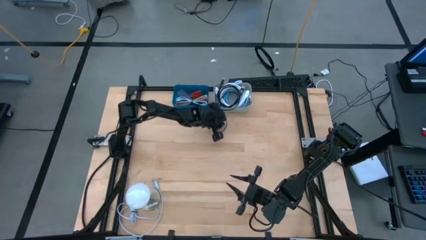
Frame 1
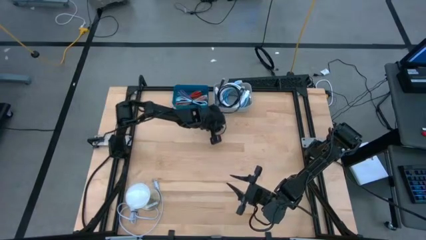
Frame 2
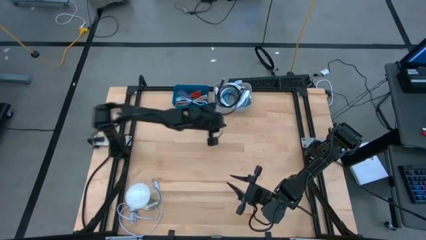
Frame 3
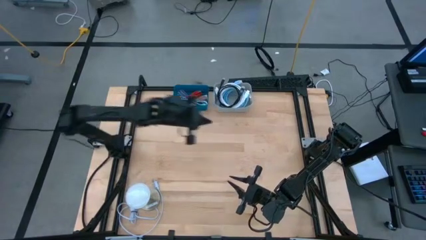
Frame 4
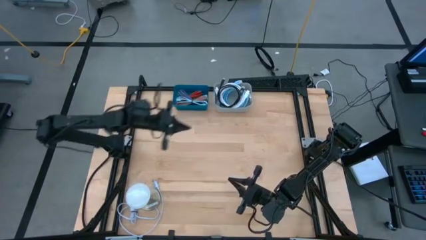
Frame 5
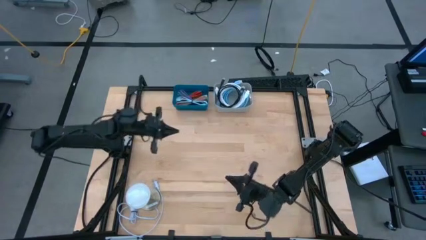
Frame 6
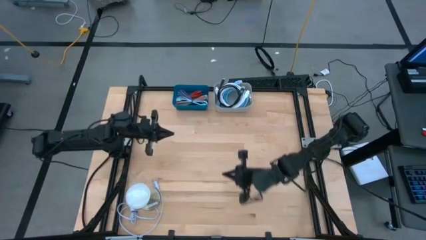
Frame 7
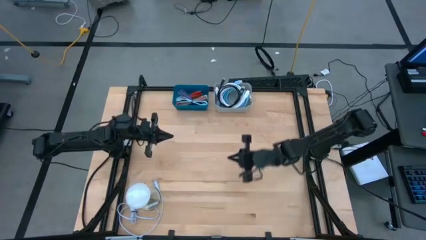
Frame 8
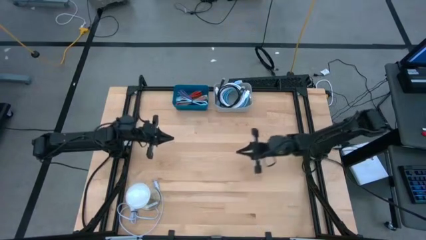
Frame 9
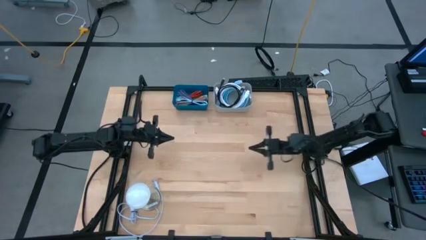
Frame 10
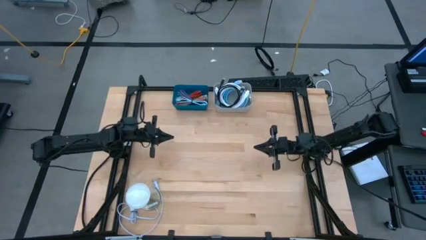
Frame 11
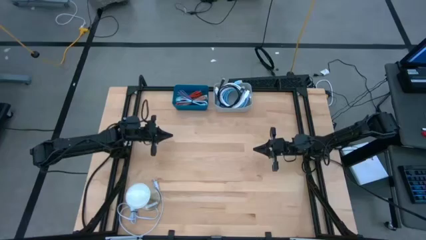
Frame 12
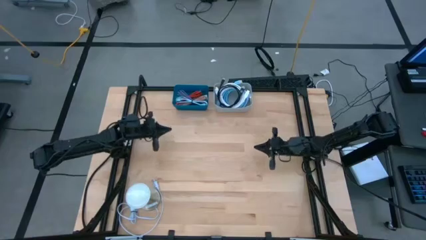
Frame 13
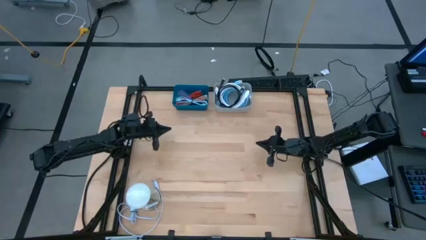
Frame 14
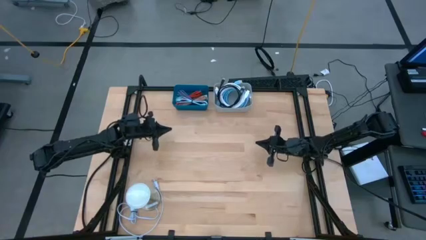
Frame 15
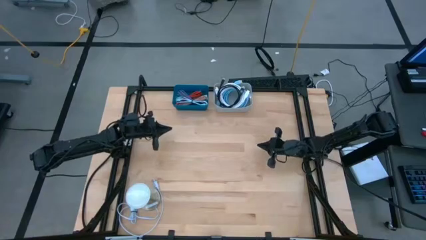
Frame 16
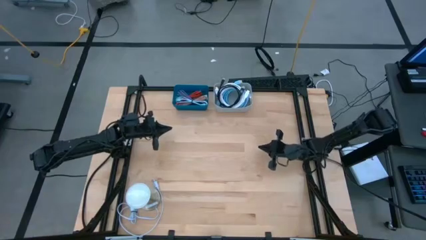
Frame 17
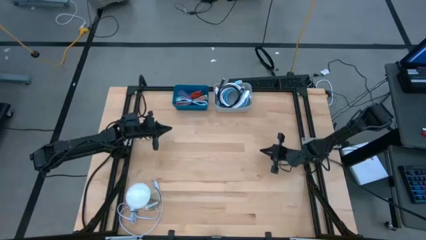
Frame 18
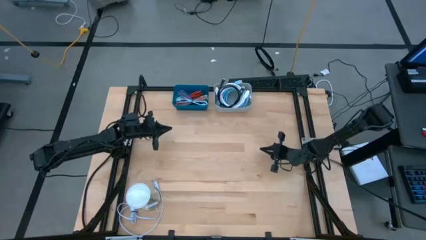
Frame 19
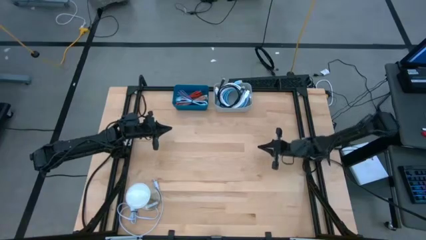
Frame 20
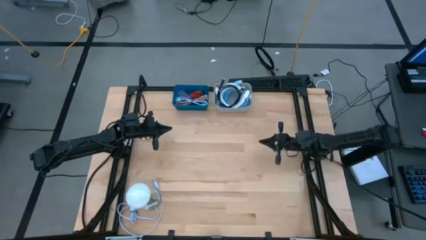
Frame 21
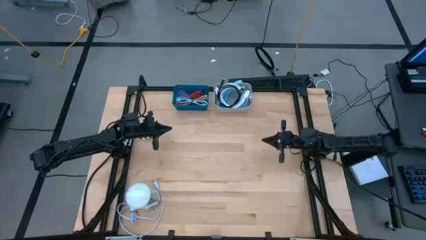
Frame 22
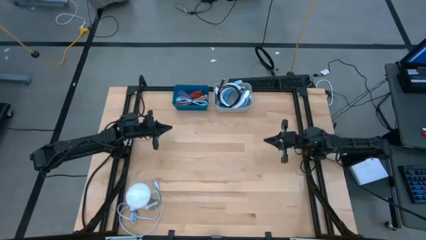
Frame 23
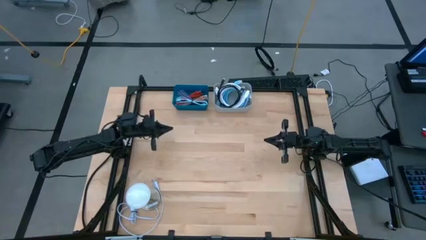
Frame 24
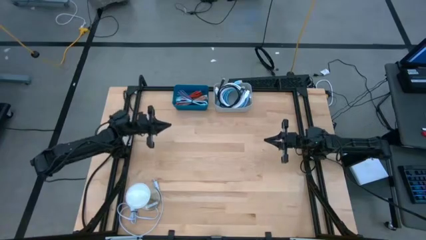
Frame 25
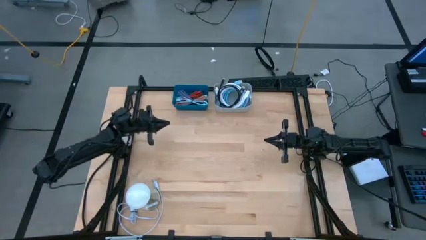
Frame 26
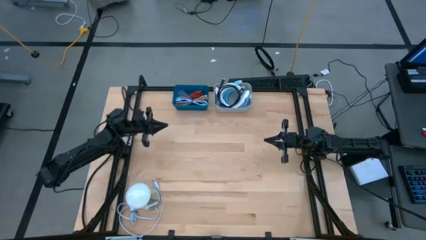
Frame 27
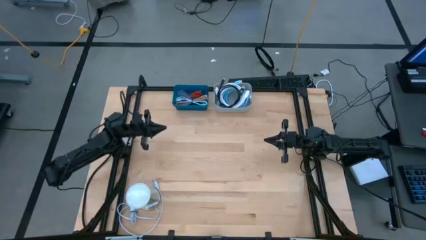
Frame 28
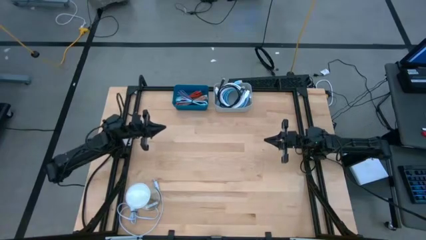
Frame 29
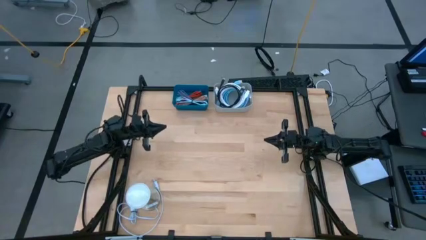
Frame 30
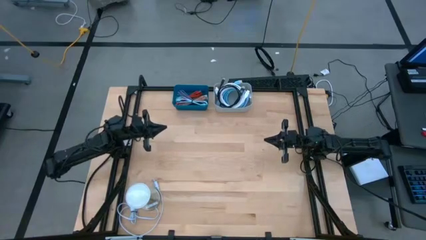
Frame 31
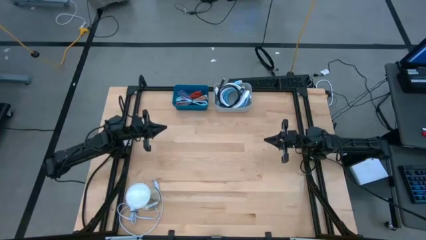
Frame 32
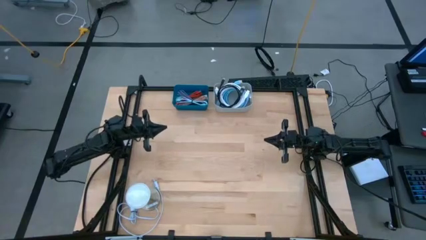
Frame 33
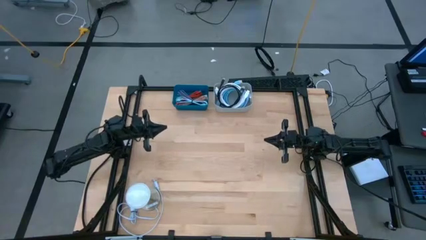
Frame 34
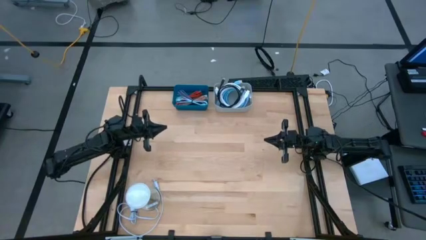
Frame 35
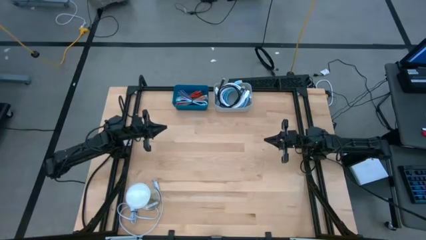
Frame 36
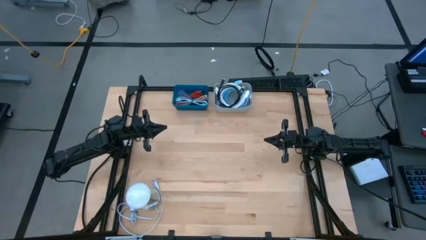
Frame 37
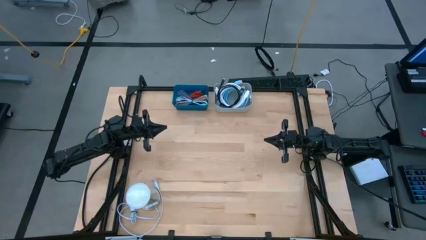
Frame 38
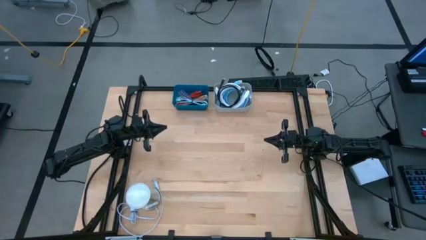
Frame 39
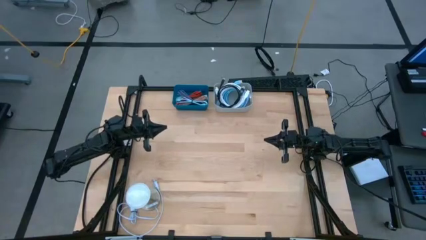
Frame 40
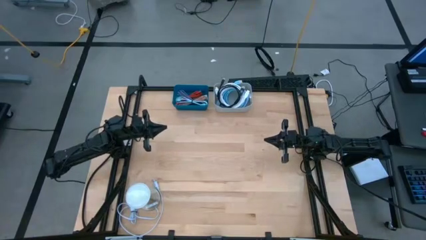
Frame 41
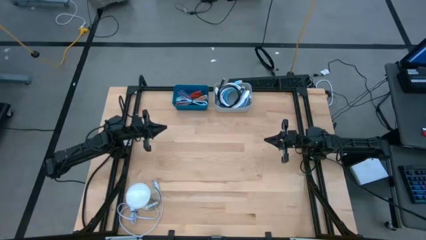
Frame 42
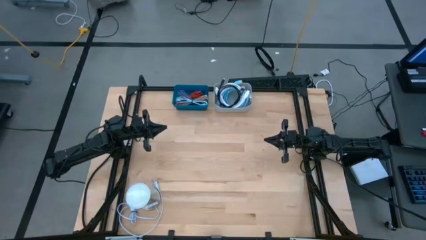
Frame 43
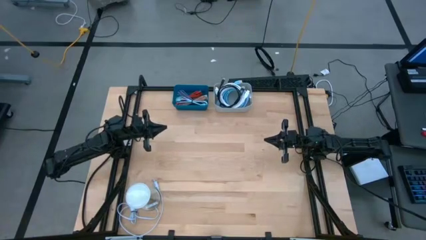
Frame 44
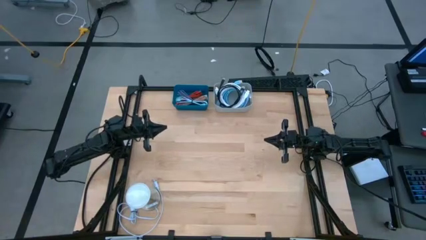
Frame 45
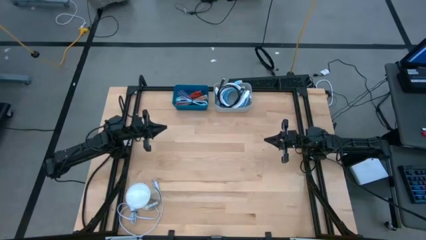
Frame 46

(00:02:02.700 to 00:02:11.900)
Task: Pick & Place USB Port
Return to Home Position

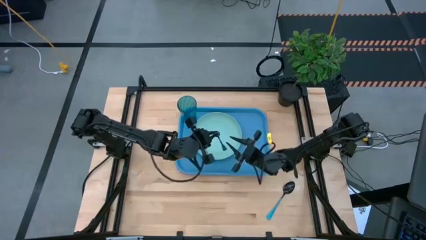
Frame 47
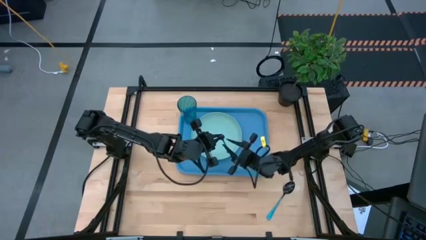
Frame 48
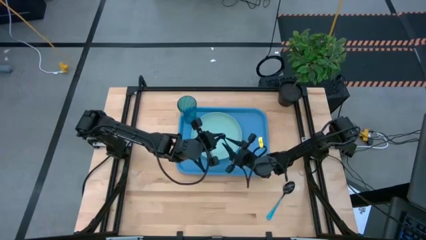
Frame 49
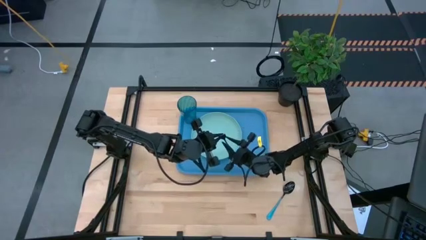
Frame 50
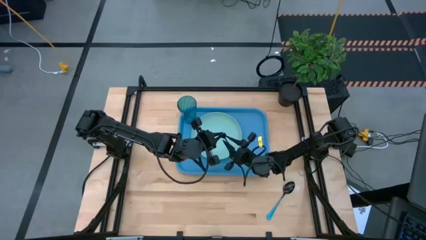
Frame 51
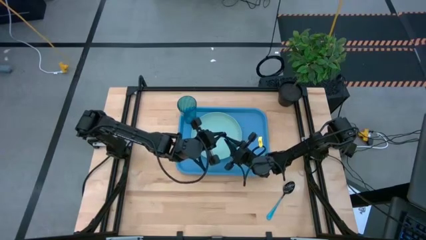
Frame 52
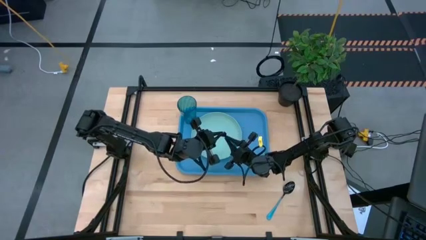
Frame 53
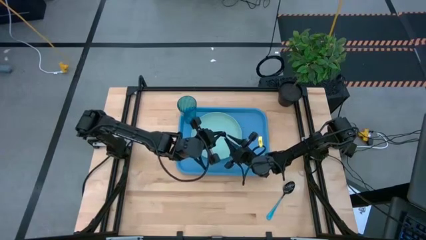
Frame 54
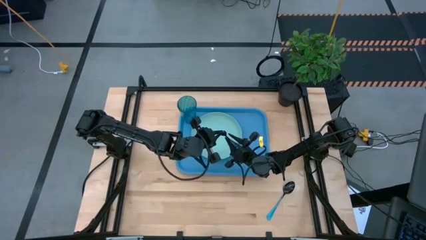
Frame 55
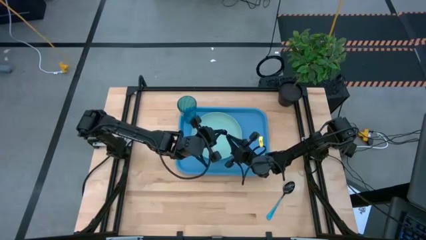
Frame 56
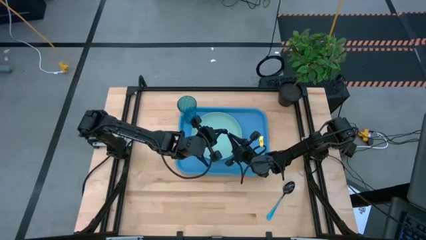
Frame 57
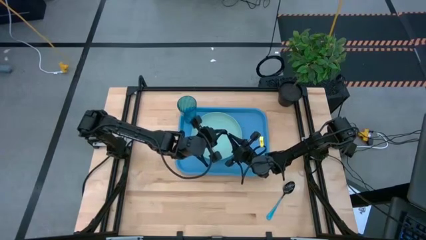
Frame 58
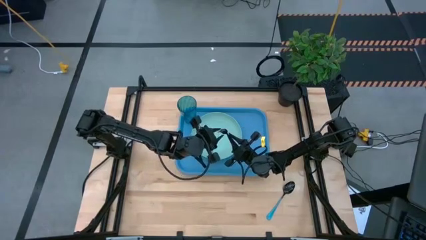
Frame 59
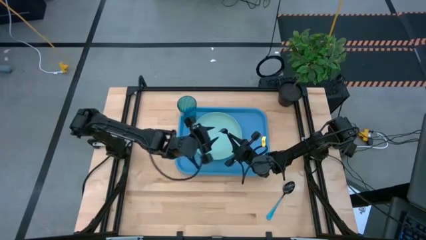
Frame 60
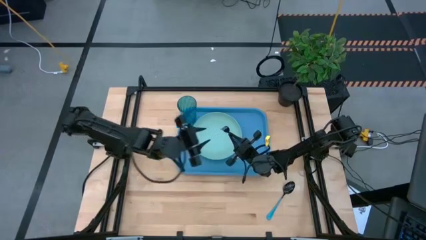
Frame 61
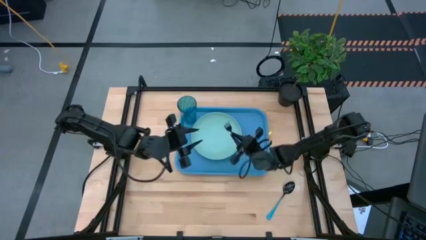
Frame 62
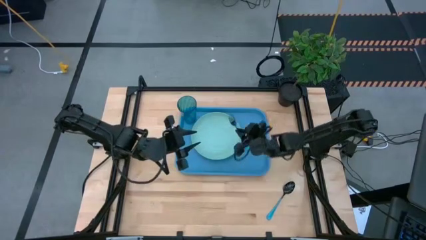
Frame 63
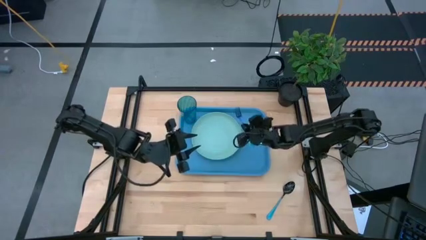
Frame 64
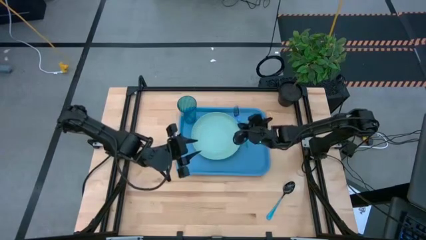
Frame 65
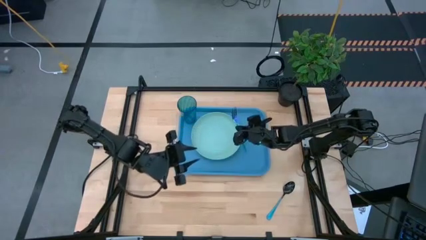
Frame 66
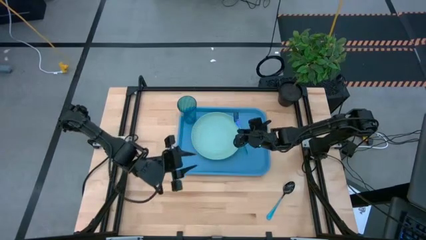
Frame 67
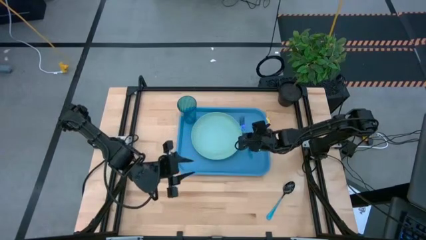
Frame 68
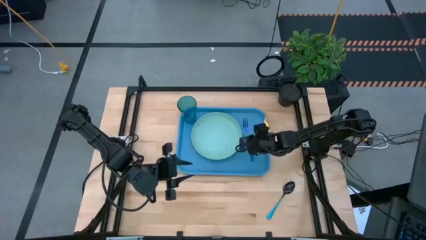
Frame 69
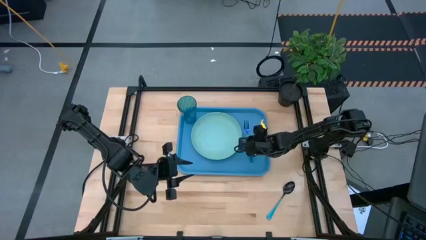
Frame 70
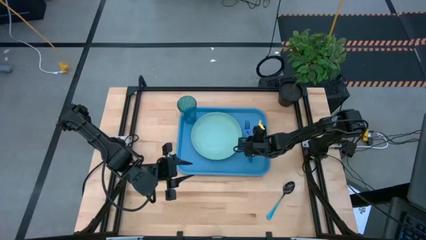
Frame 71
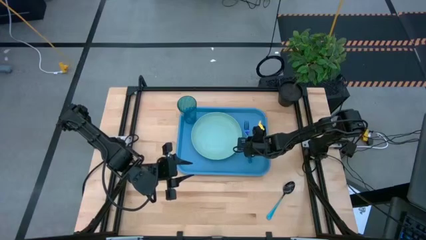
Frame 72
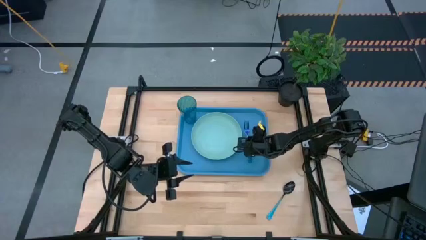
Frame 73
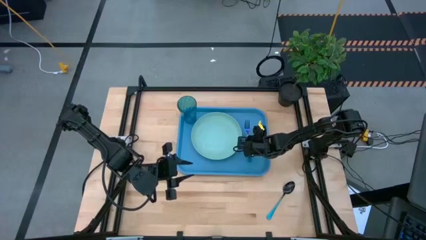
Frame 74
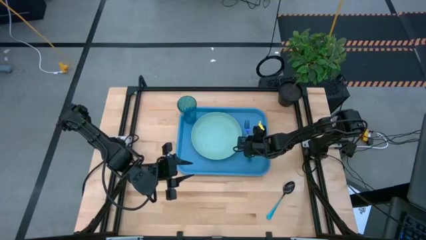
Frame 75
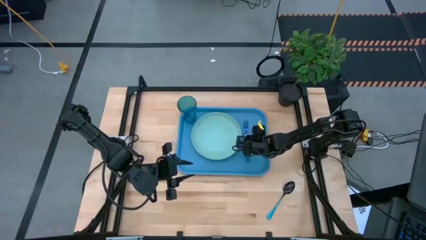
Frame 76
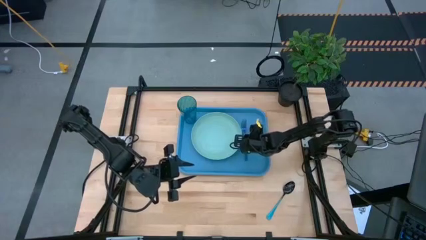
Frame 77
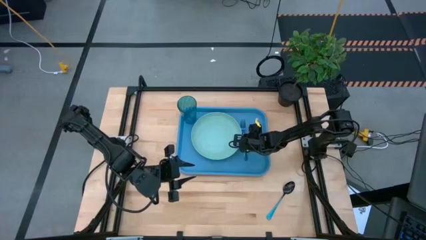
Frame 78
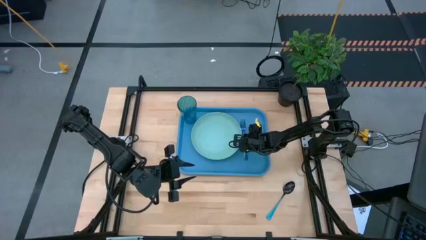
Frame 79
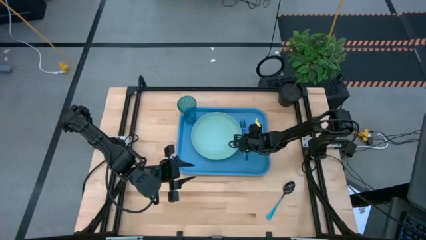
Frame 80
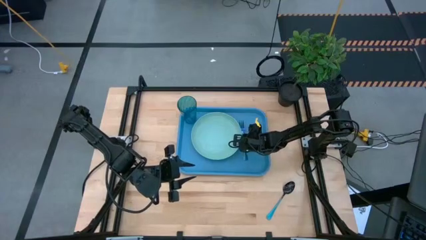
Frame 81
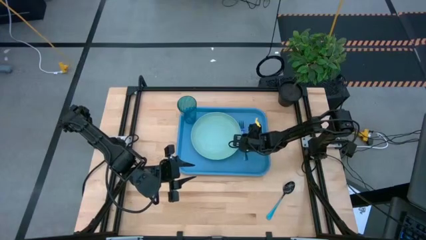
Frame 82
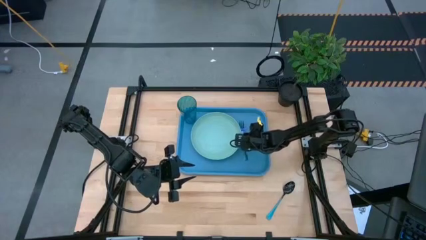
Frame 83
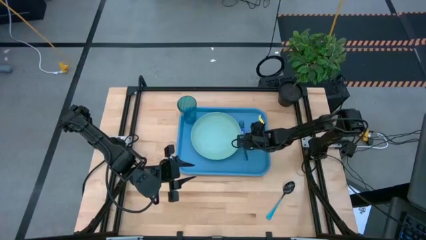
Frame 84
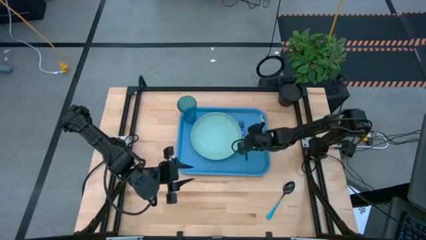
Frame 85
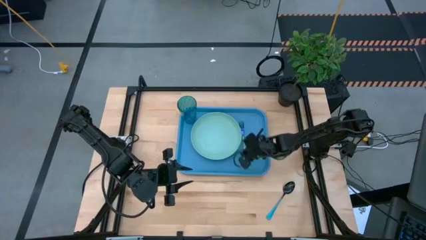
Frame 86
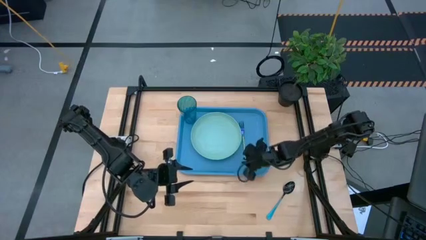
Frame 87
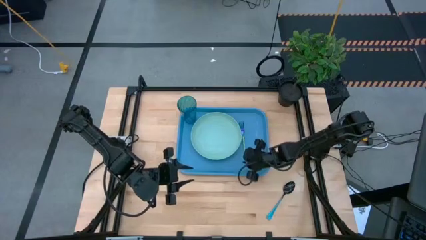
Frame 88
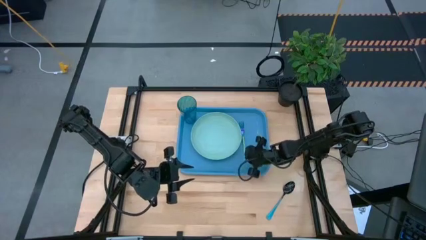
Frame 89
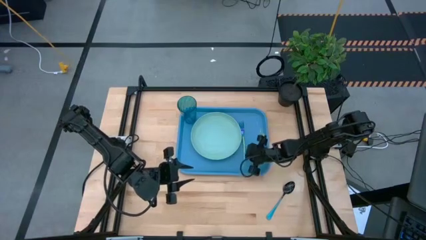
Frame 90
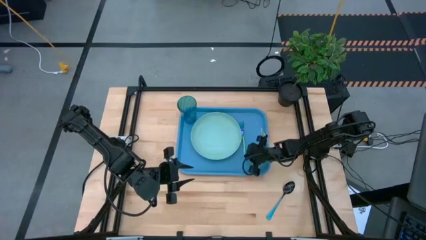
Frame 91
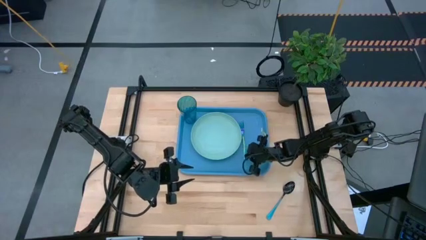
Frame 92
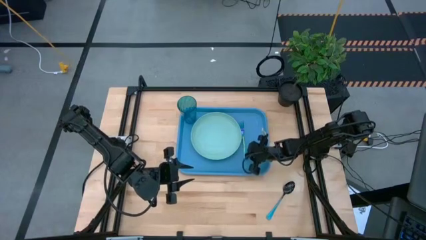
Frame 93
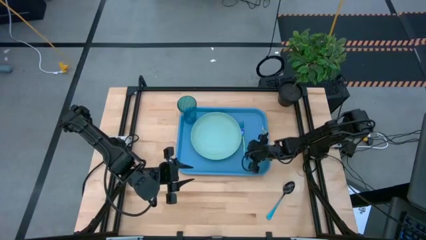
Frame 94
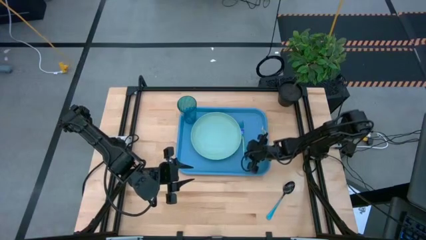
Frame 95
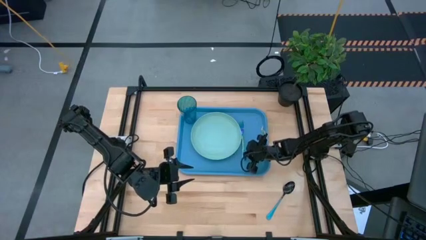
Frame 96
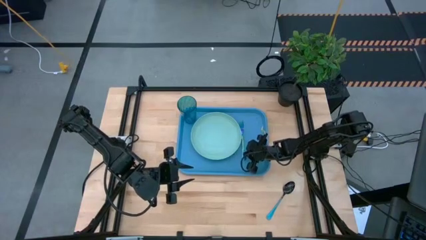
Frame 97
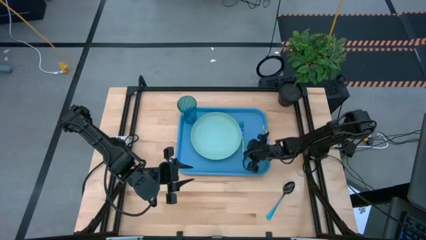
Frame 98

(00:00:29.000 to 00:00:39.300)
Task: Pick and place plate/cup/fork/spoon on tray
Put the blue fork on the blue serving tray
